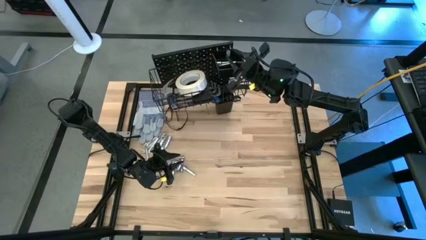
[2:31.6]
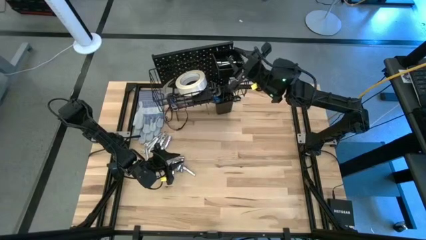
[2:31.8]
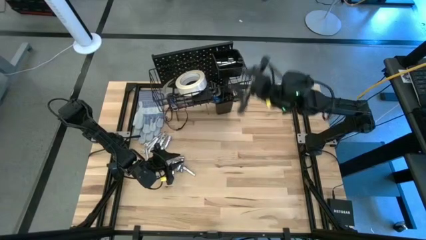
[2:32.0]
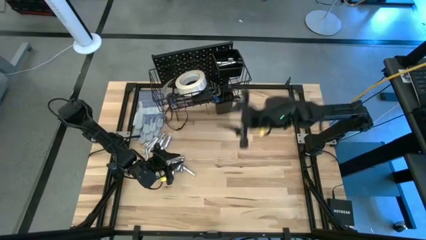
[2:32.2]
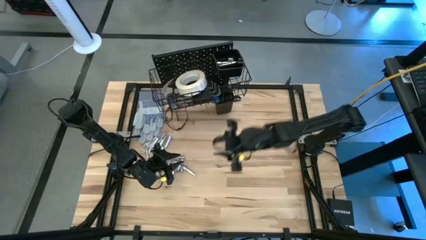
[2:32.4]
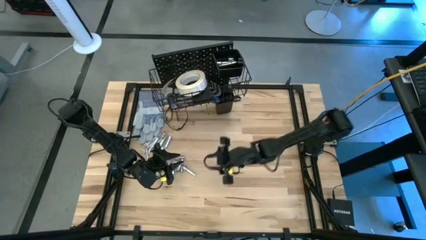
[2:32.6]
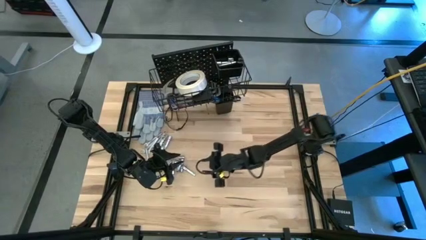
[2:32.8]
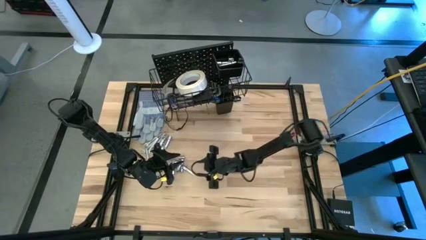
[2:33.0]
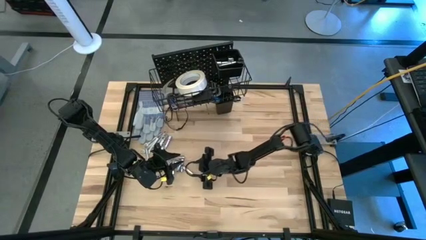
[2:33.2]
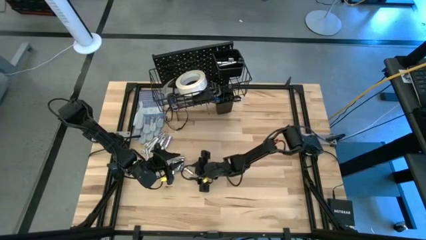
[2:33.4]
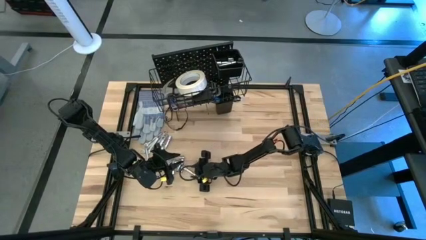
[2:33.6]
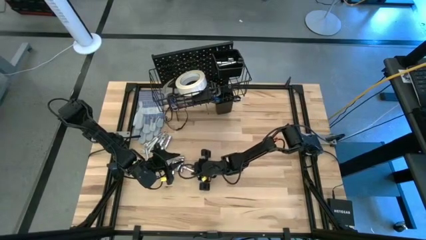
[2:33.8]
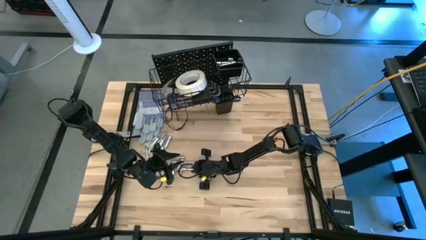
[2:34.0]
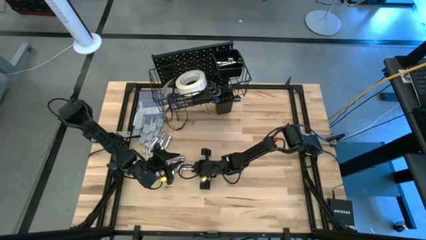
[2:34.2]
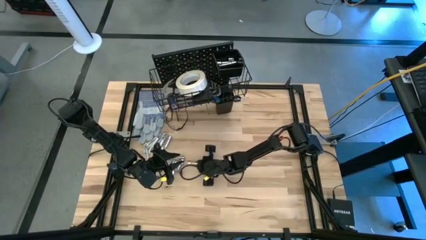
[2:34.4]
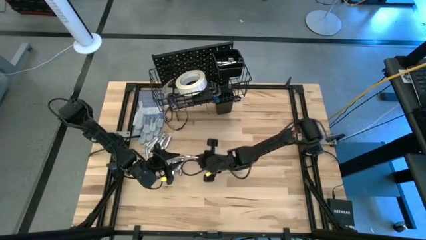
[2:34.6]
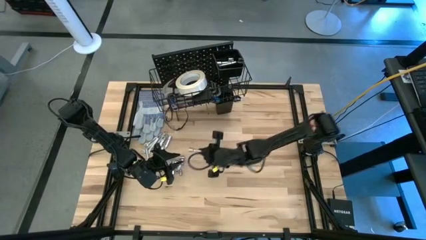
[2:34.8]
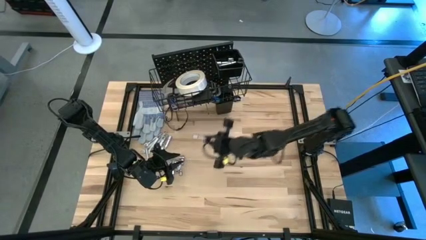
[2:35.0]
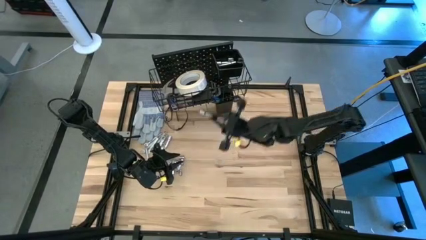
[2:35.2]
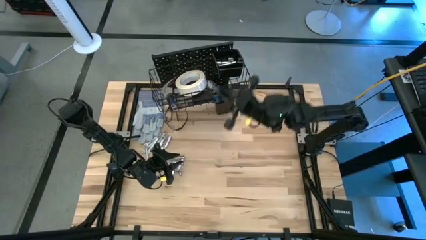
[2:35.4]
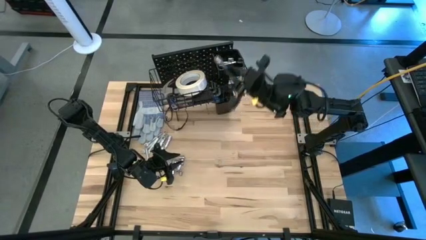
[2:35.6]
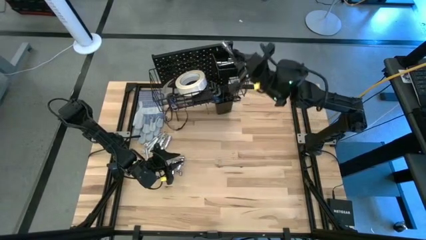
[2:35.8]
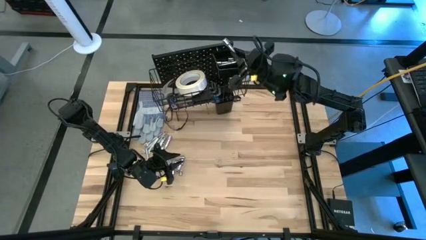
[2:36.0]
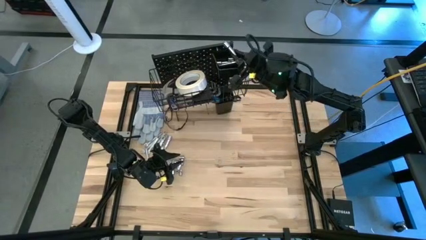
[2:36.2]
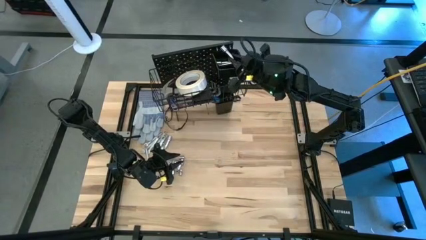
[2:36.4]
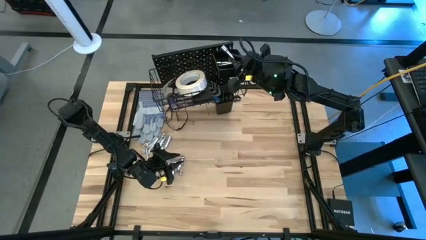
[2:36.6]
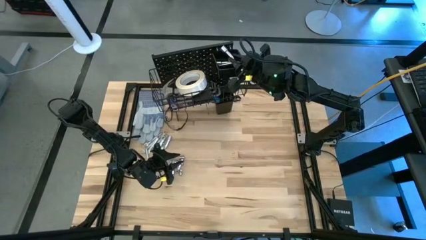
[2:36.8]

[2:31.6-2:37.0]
Task: Hang tools onto peg board
Put the extension bar into the top black bin on the pegboard

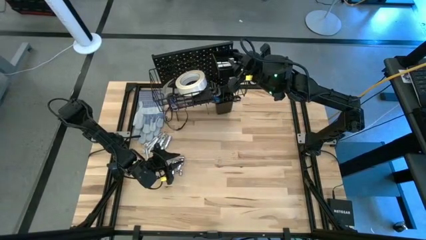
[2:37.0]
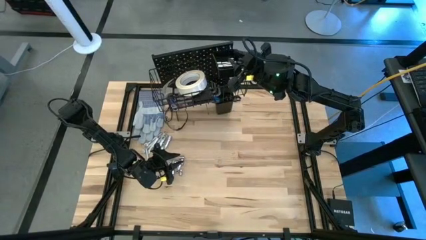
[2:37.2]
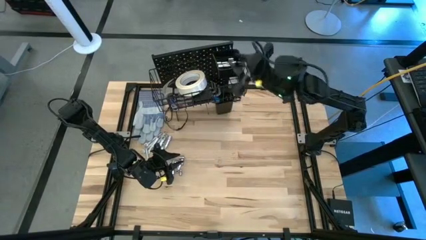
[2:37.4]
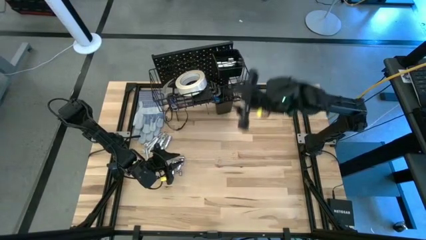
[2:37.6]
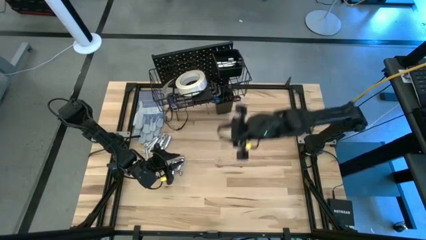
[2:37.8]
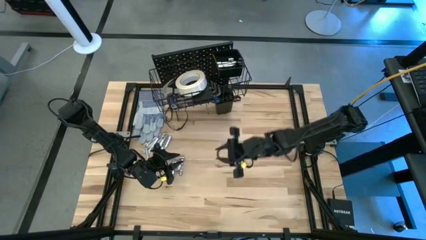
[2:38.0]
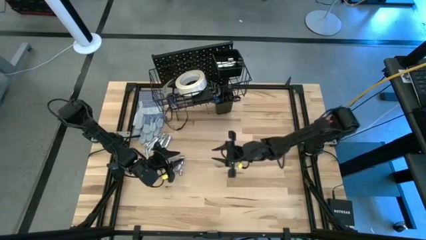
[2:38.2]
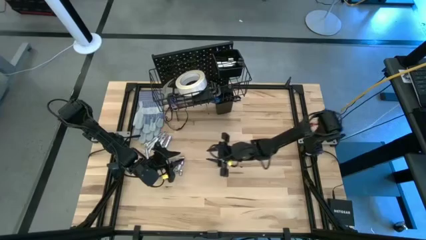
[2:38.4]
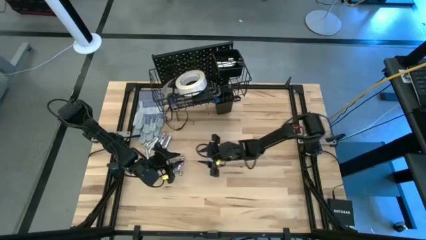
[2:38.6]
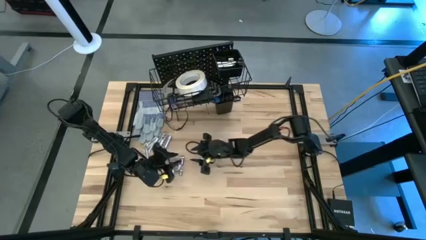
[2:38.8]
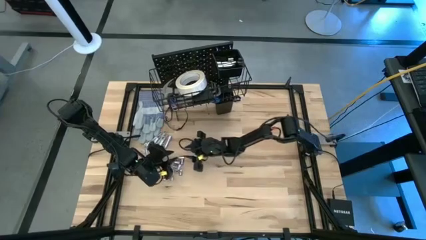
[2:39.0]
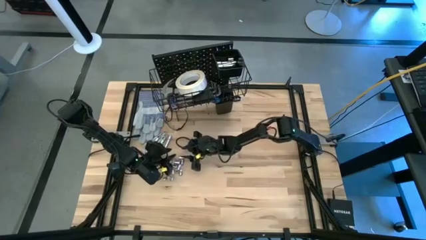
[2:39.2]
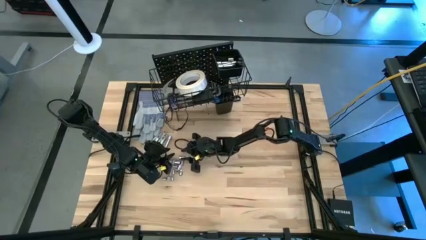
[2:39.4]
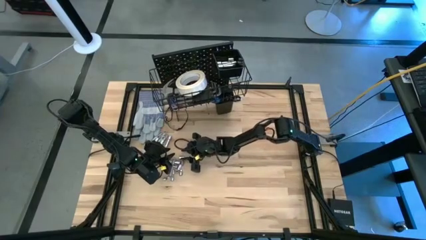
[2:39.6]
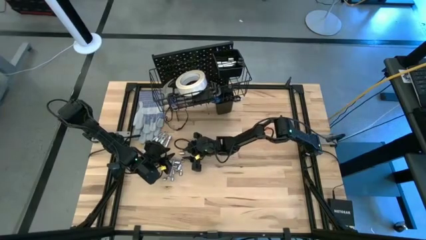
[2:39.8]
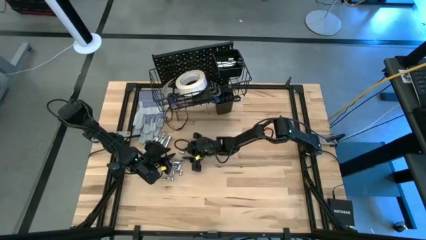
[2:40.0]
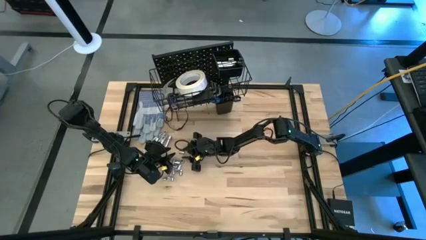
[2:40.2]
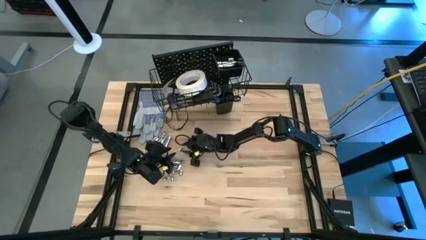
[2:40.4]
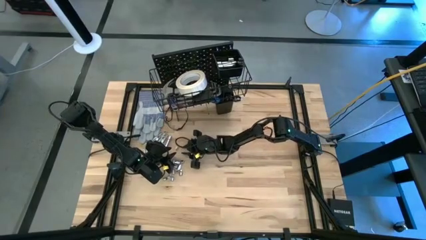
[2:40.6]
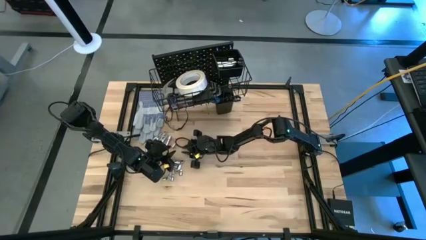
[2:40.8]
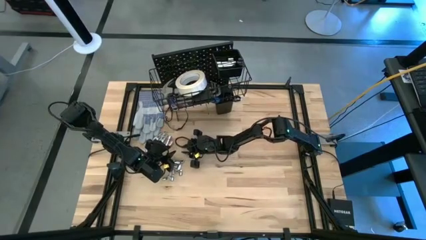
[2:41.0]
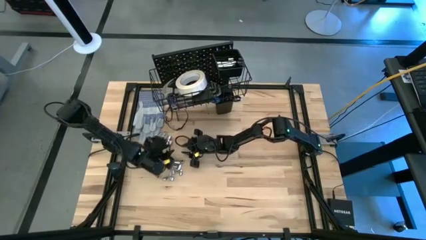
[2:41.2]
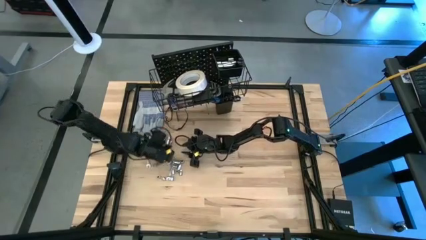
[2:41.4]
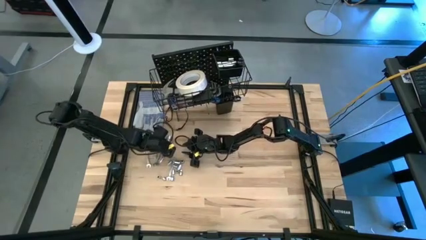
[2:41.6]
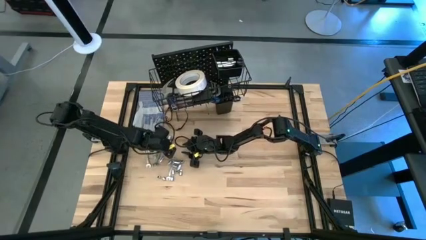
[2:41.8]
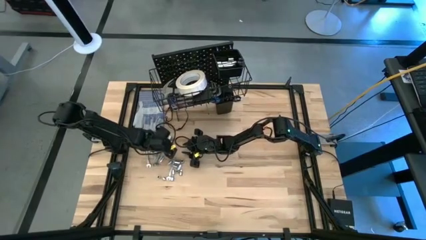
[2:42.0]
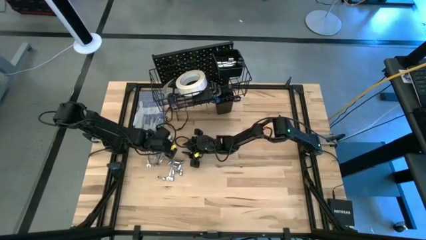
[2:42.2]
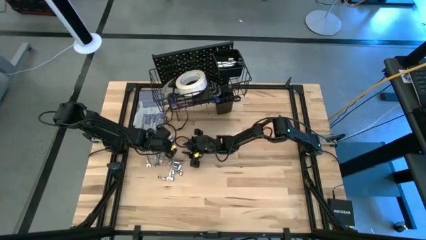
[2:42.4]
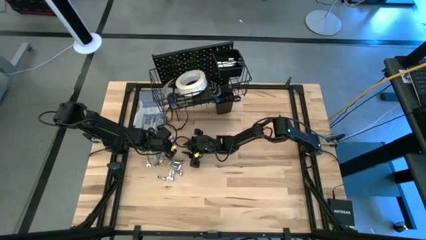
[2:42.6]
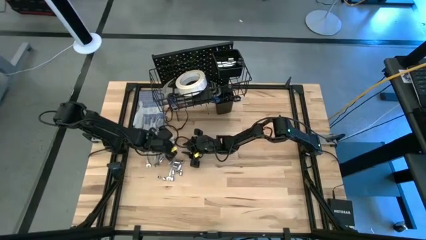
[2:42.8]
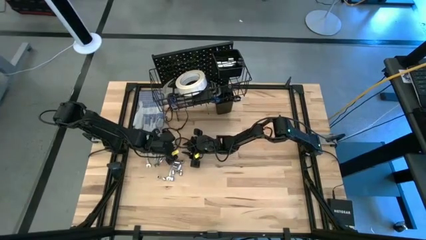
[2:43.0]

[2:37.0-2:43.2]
Put the socket into the top black bin on the pegboard

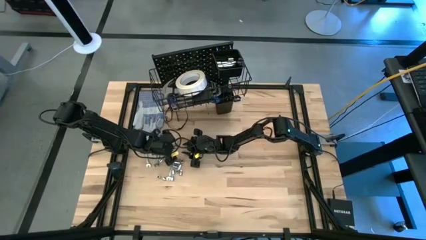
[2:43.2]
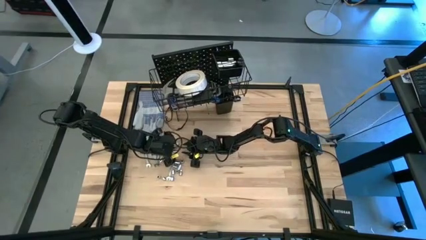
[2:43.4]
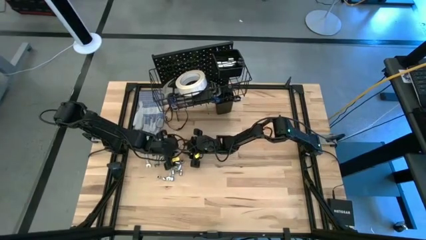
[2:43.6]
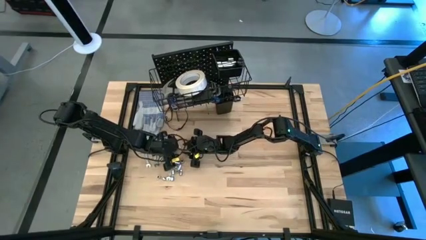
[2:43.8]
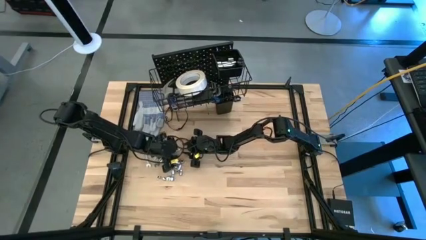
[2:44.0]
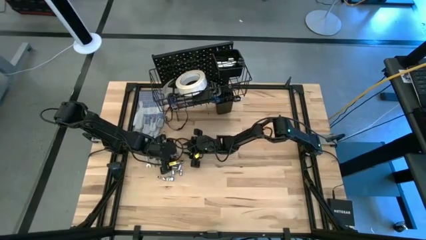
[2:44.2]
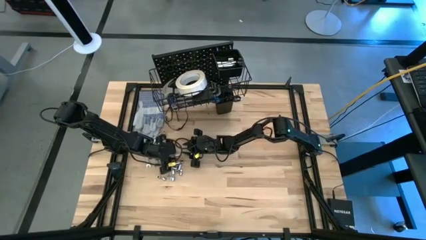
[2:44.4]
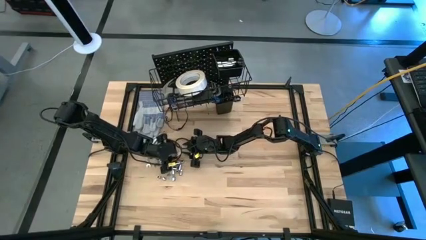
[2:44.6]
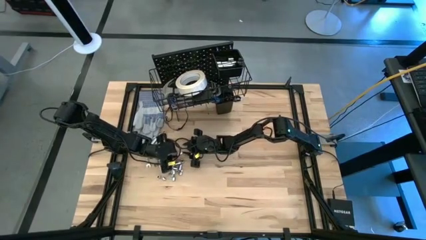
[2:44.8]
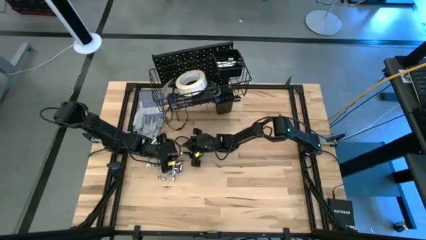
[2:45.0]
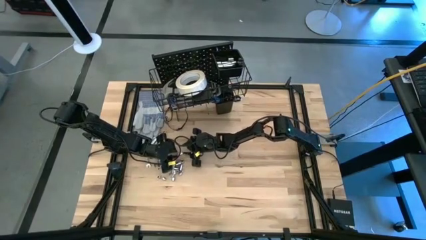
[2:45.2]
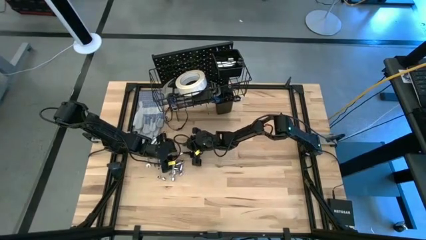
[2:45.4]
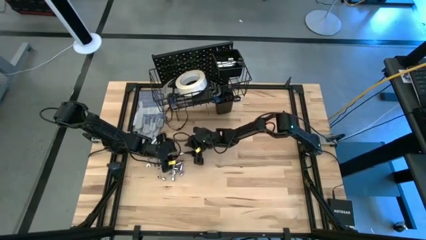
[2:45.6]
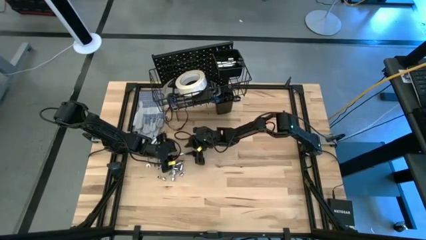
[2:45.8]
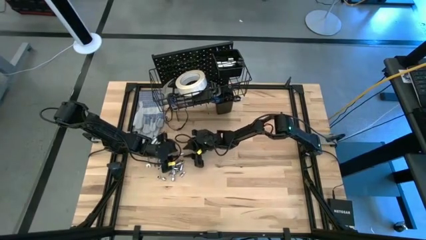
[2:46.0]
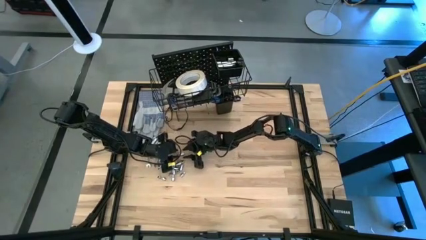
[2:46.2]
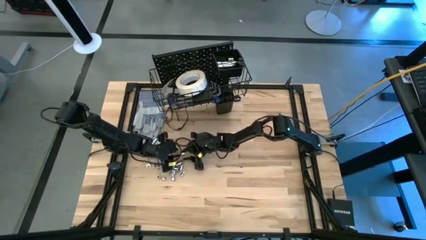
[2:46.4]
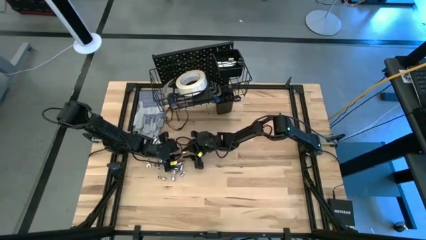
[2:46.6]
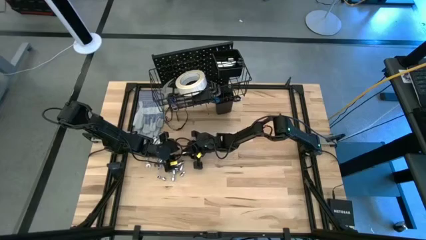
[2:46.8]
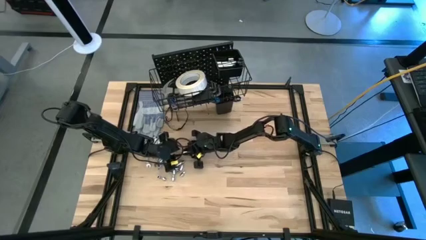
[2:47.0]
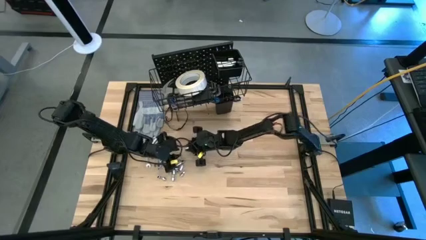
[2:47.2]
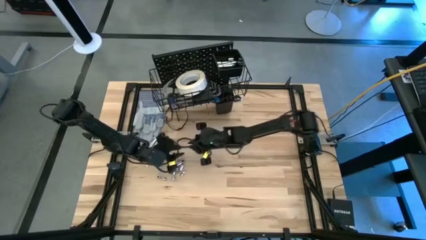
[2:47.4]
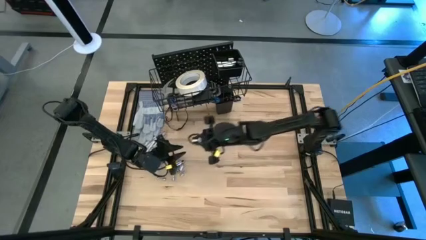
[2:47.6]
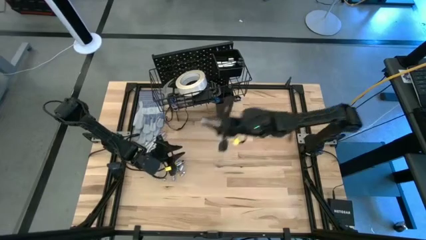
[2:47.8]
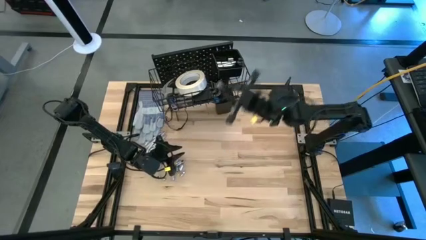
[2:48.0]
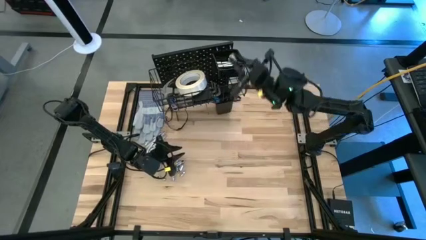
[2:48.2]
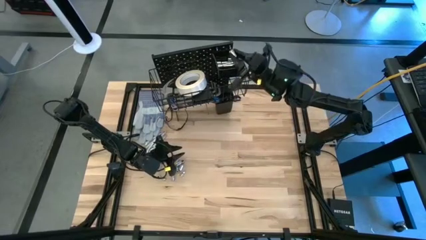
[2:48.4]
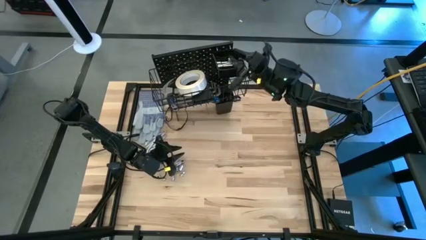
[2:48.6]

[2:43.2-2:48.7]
Put the socket into the top black bin on the pegboard
